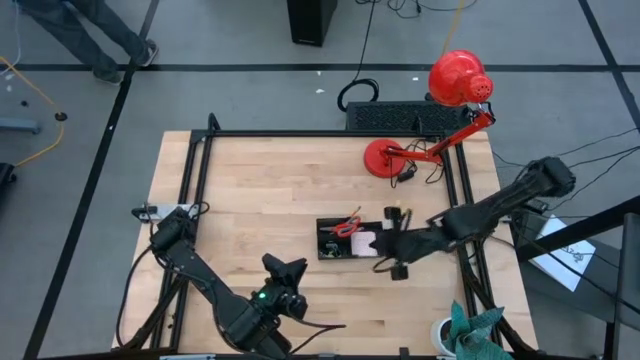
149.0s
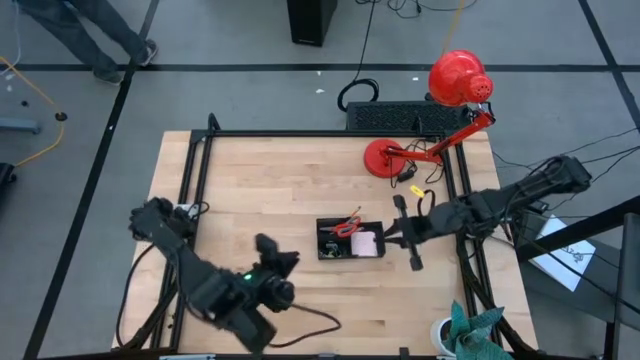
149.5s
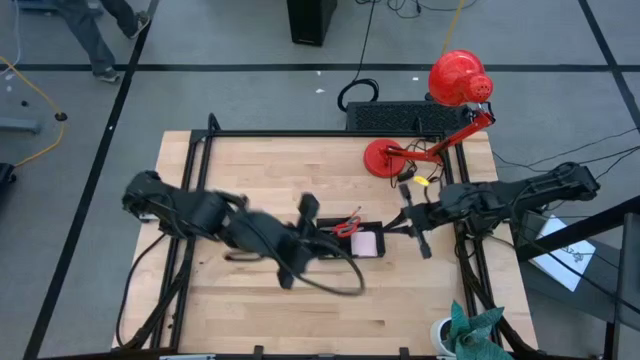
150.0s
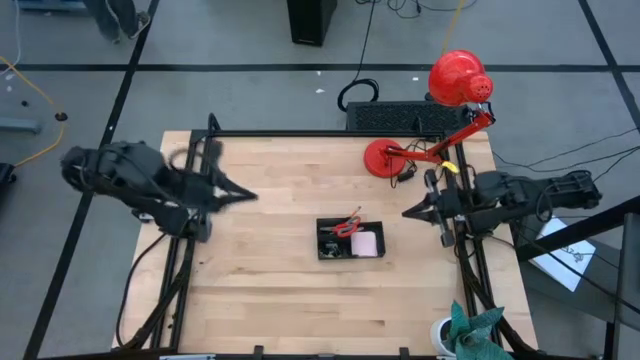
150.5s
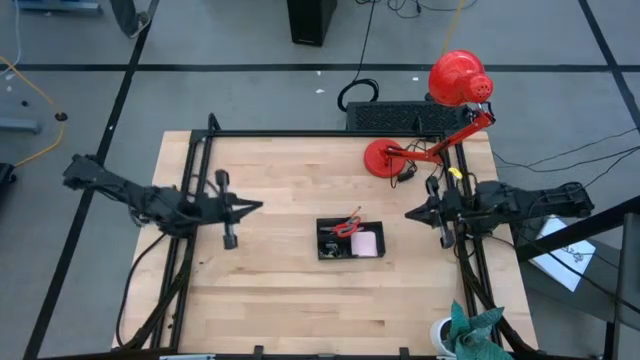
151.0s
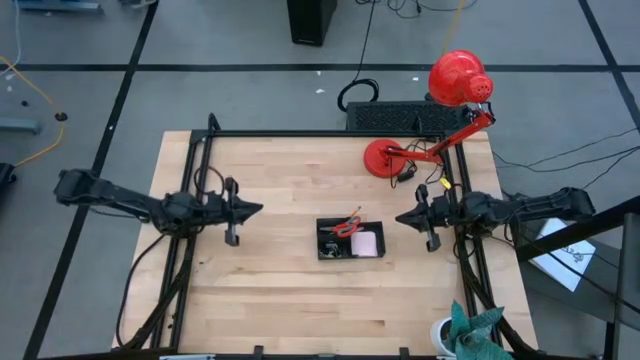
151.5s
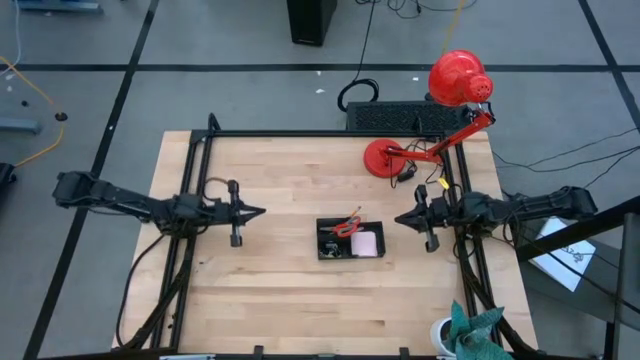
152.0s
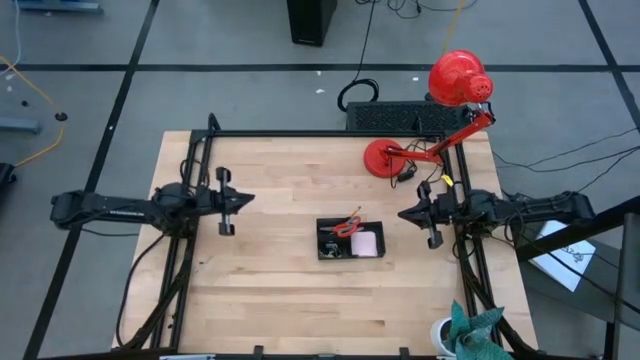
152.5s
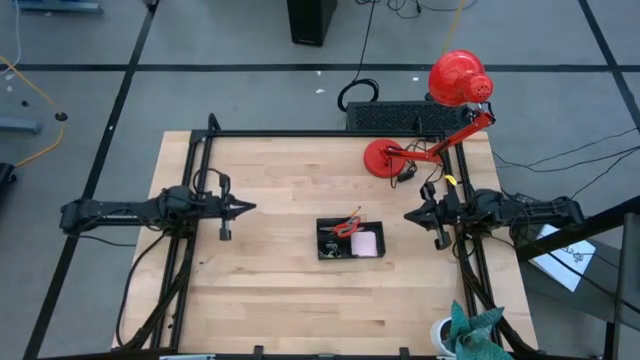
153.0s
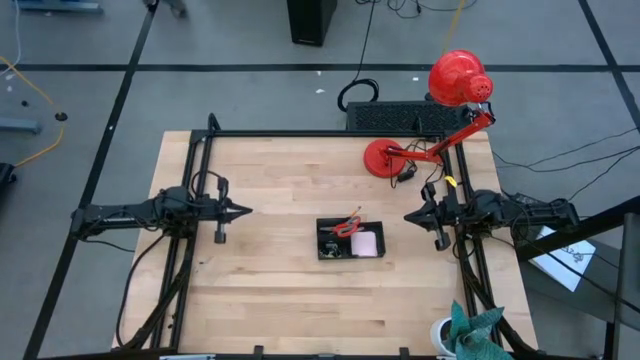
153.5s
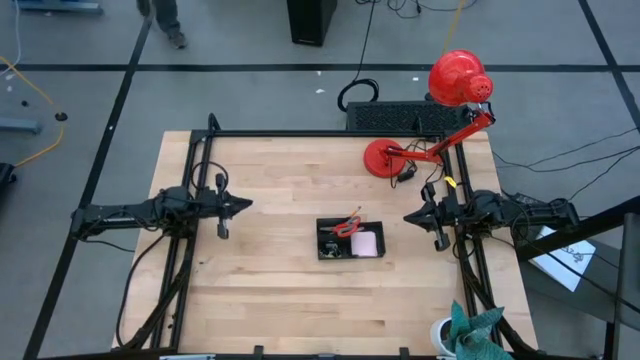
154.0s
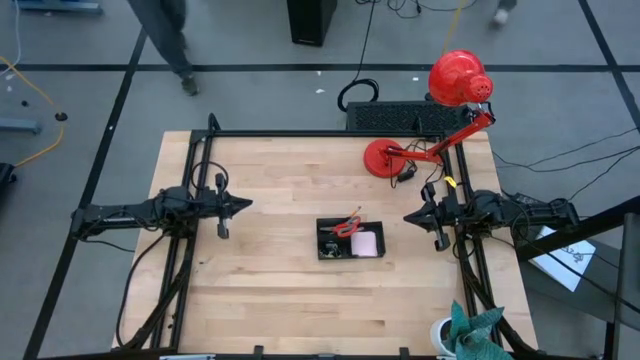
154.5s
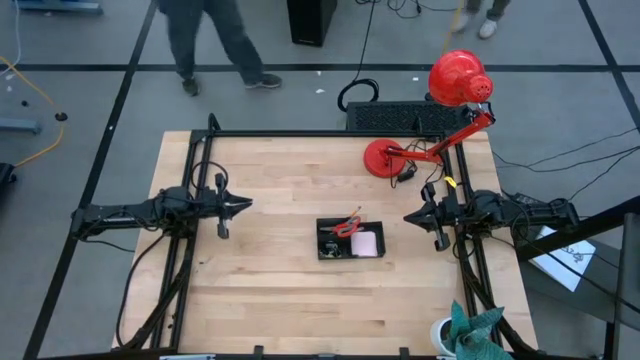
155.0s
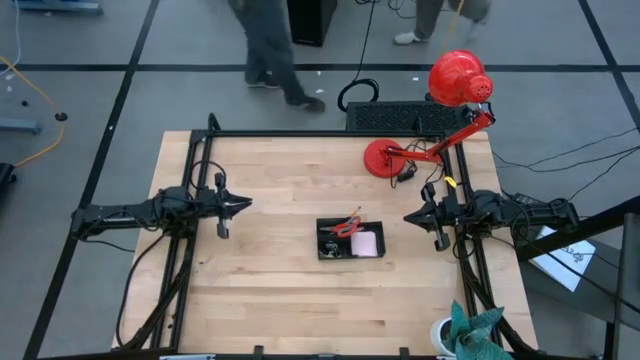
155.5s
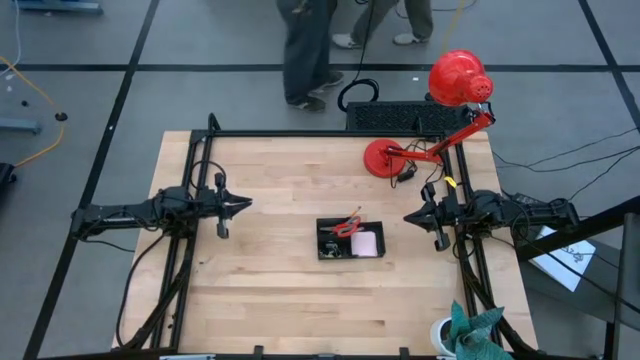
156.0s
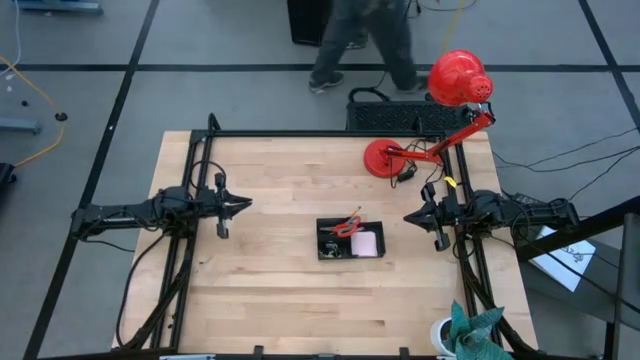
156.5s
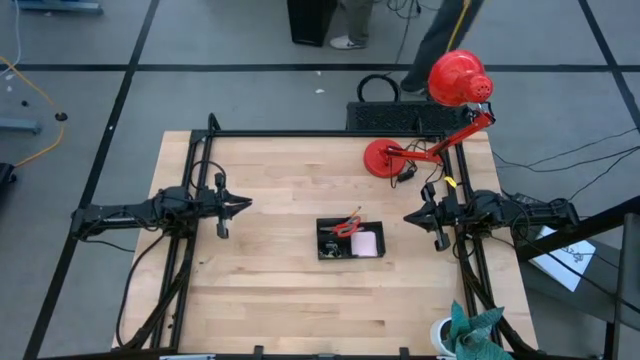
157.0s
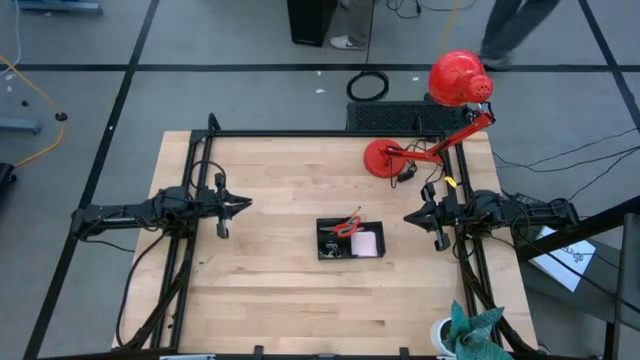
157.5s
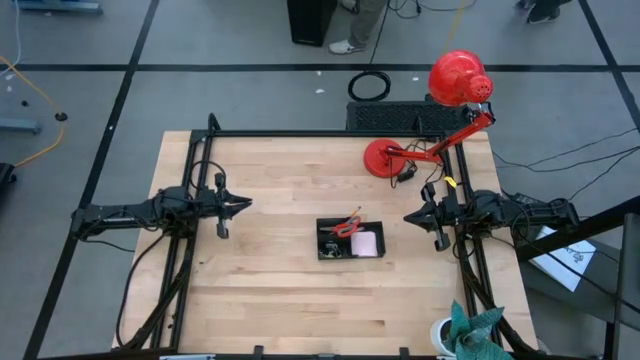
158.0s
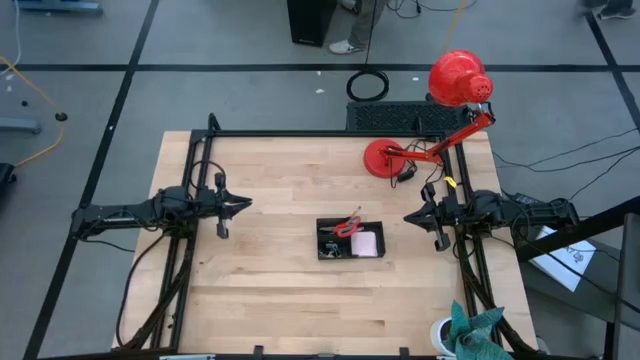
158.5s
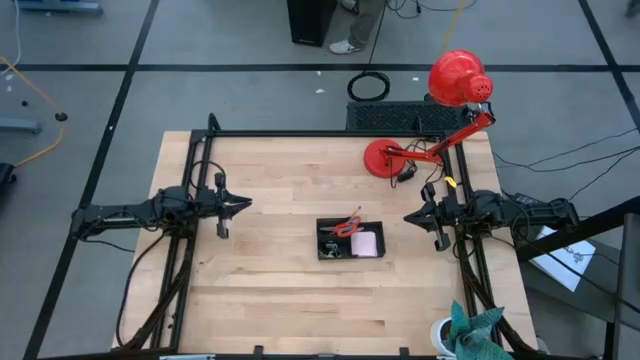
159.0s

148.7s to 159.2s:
Task: Pick and place office supplies into organizer
Return to Home Position

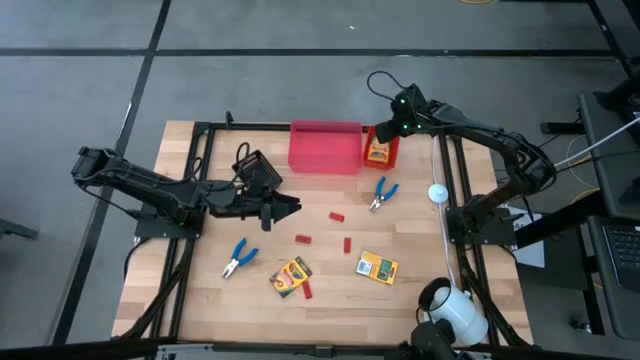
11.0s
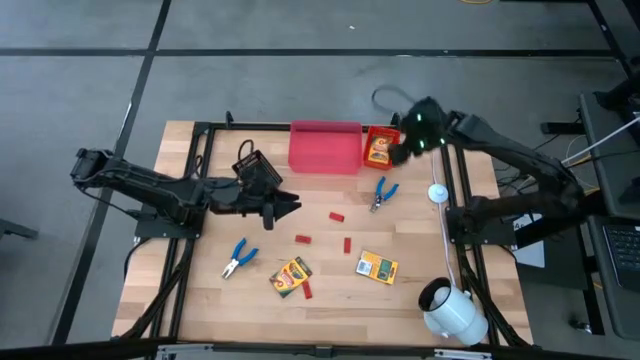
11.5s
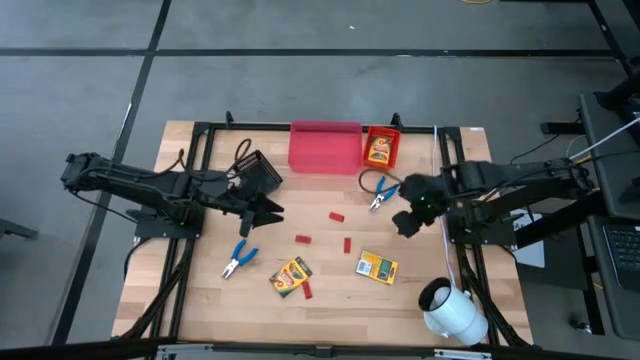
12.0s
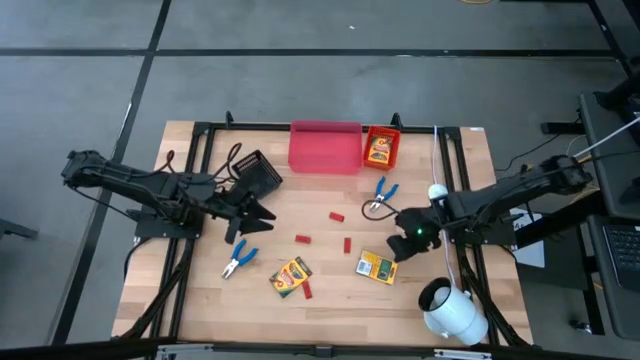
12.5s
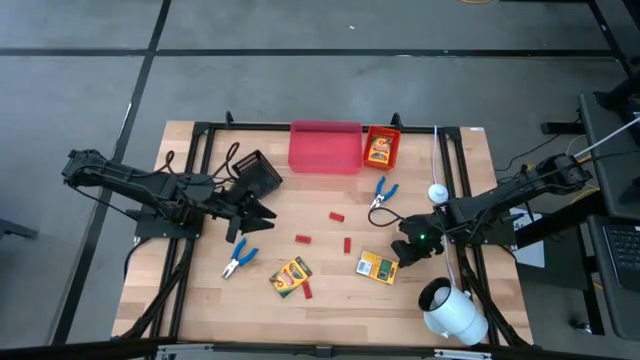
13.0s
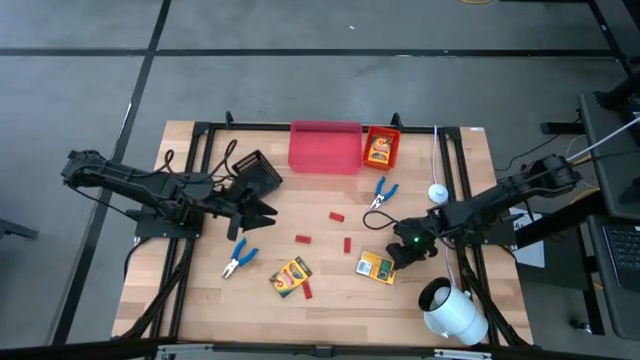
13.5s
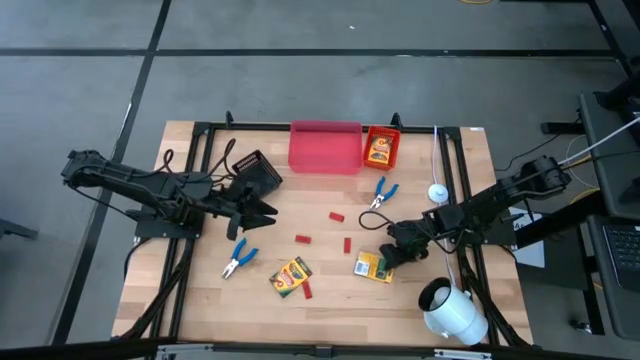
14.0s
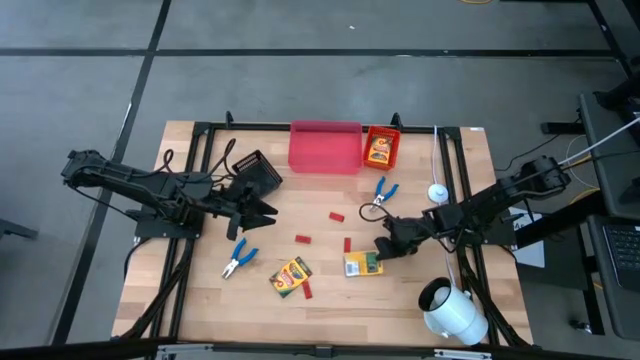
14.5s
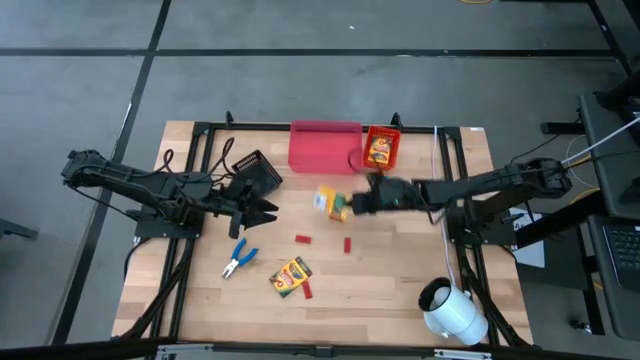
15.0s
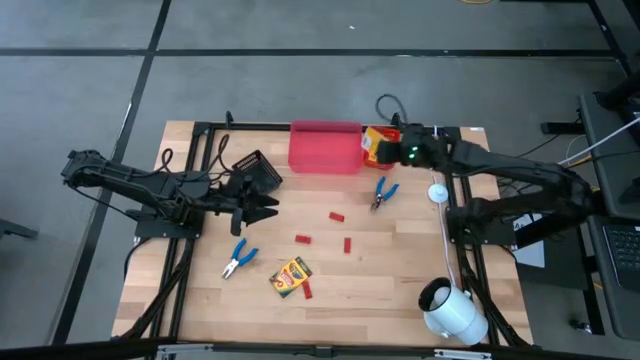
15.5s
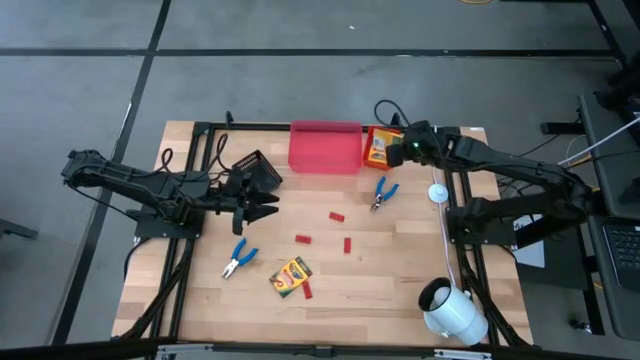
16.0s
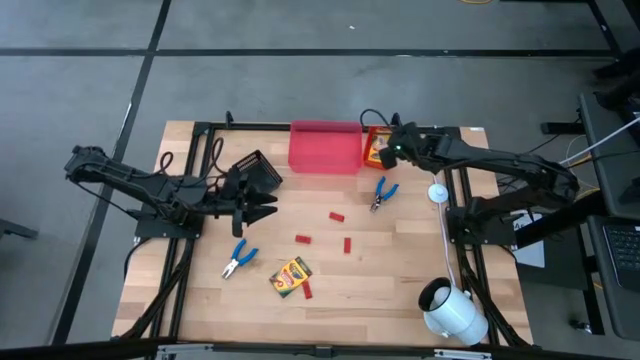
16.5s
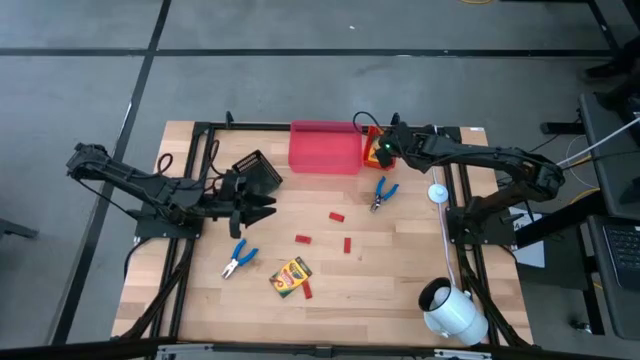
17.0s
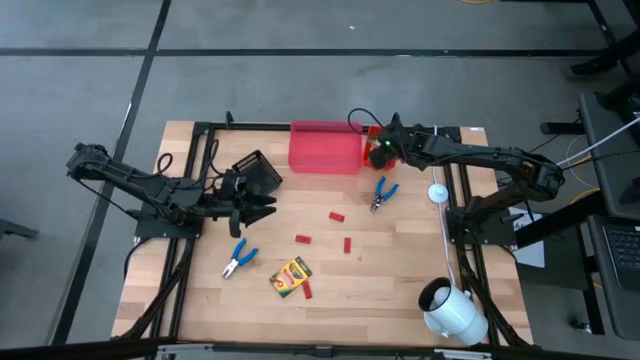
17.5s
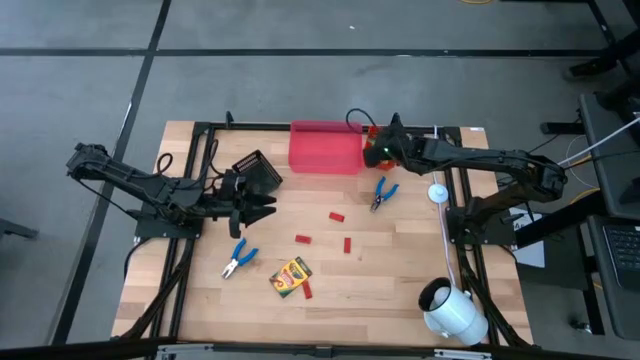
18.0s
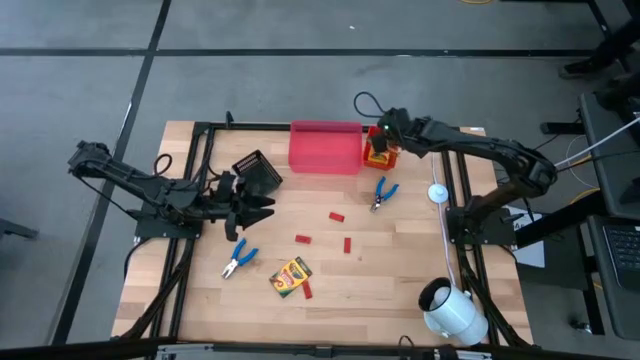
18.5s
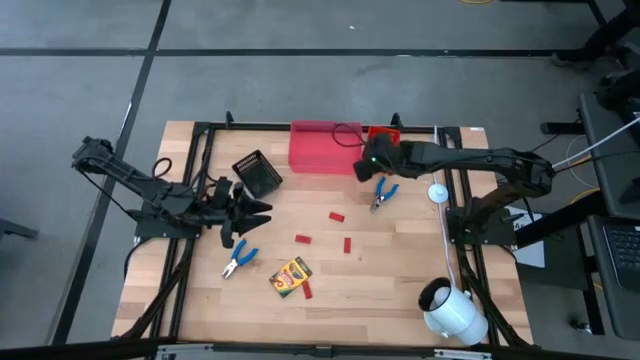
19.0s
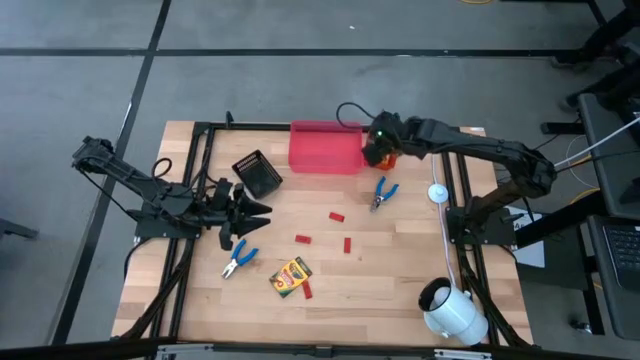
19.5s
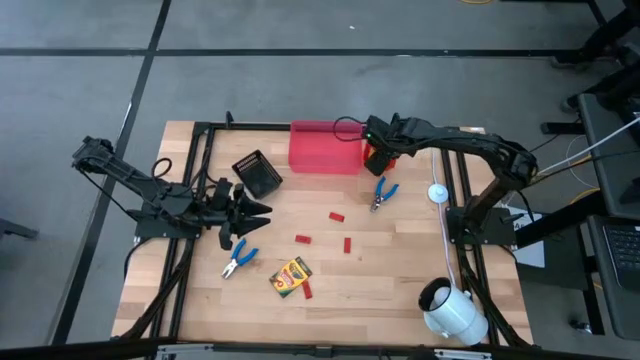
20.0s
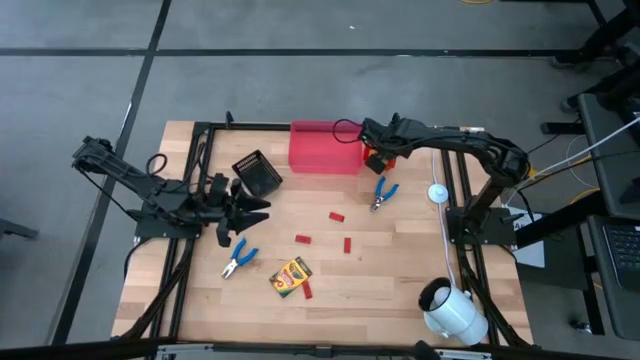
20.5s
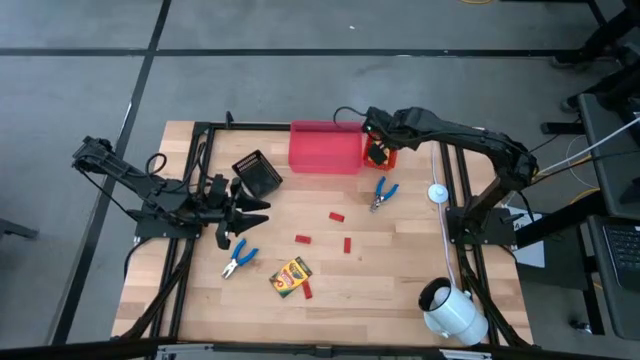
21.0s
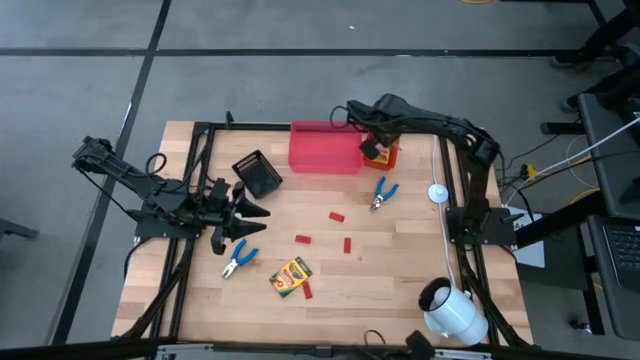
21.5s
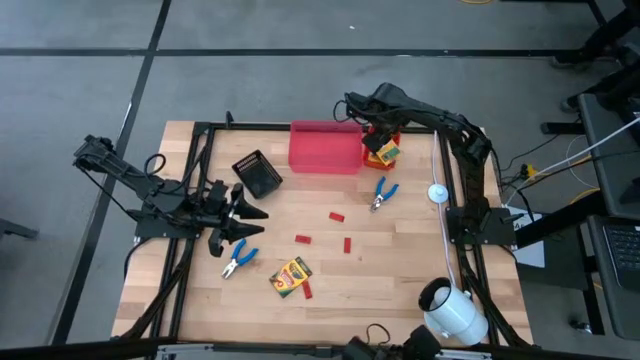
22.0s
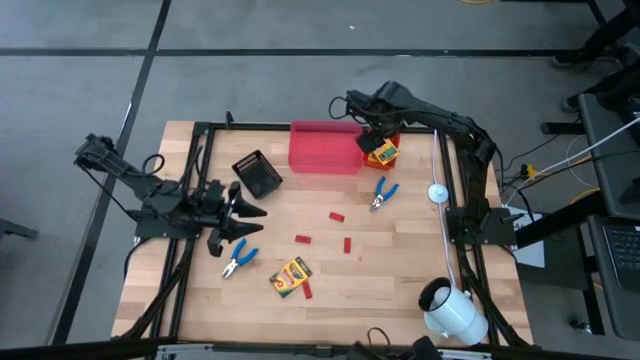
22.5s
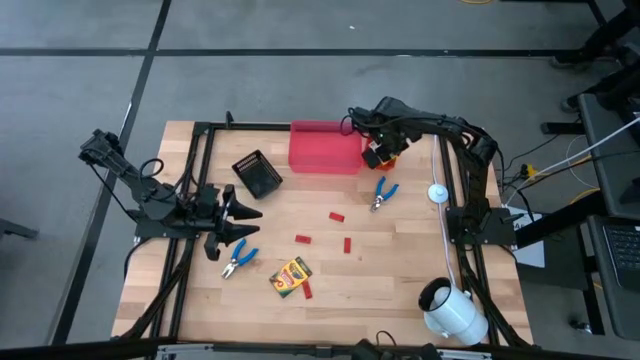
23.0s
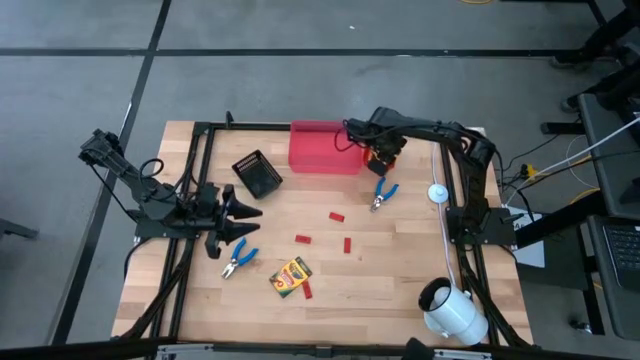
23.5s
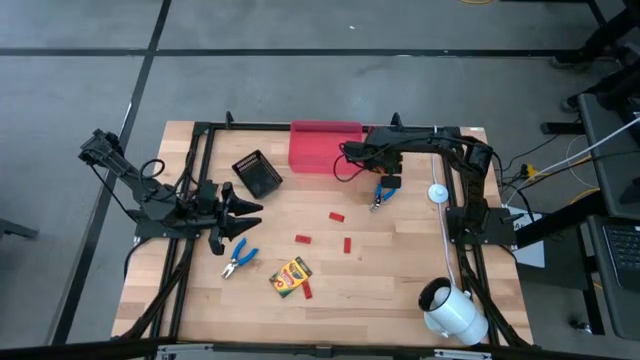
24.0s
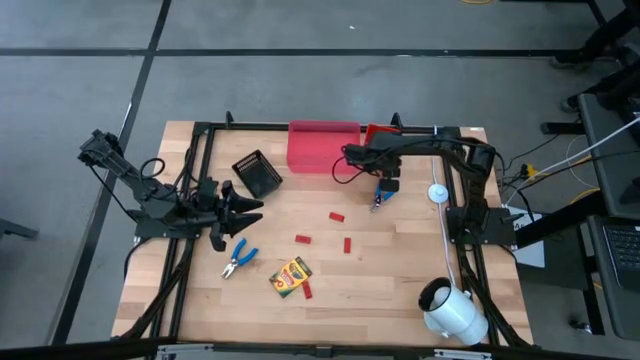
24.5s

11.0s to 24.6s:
Task: Pick & Place School Supplies
Put the yellow crayon box into the red bin
